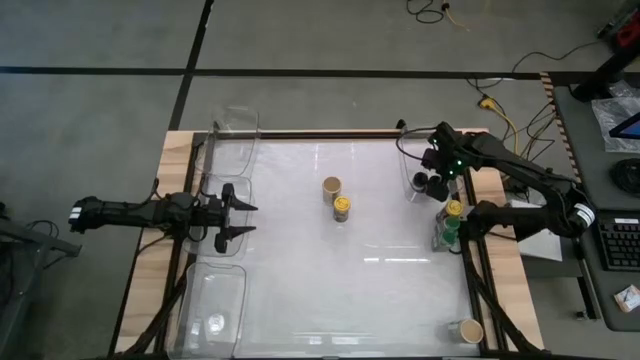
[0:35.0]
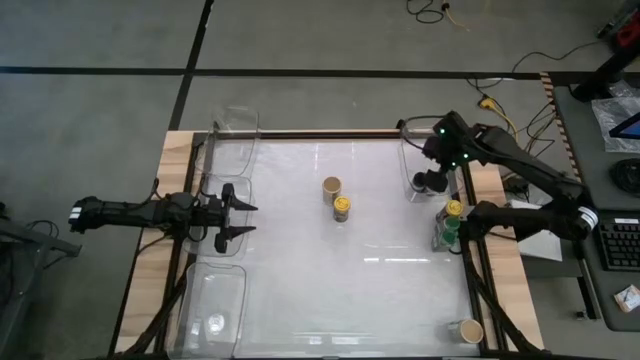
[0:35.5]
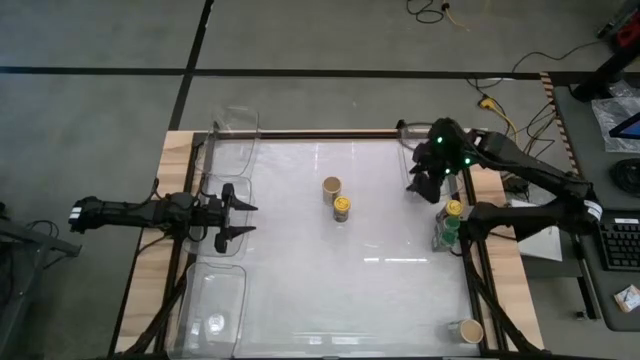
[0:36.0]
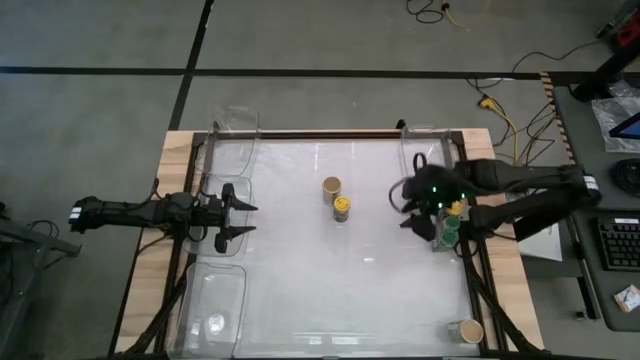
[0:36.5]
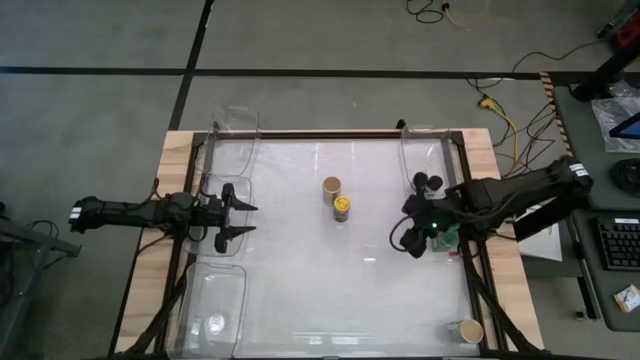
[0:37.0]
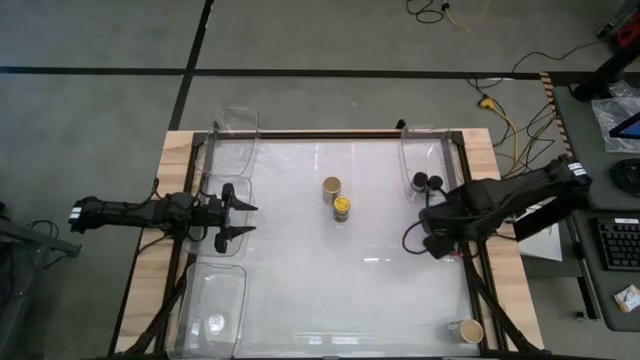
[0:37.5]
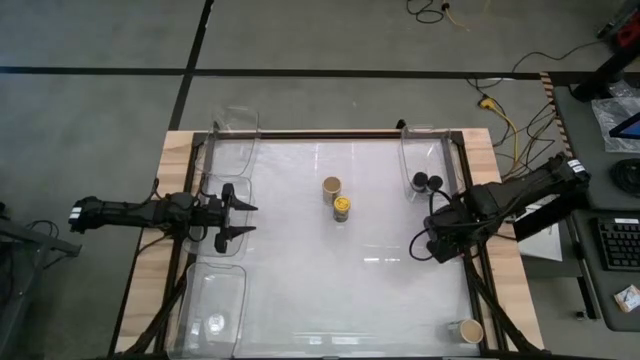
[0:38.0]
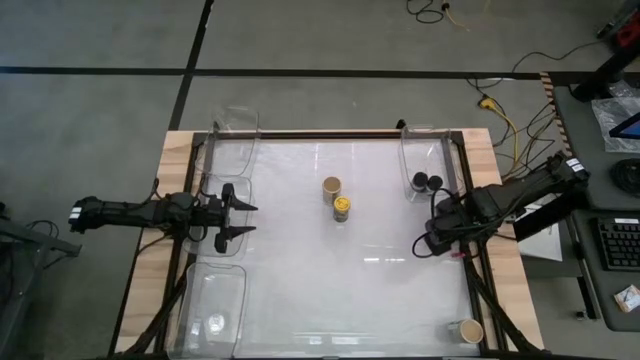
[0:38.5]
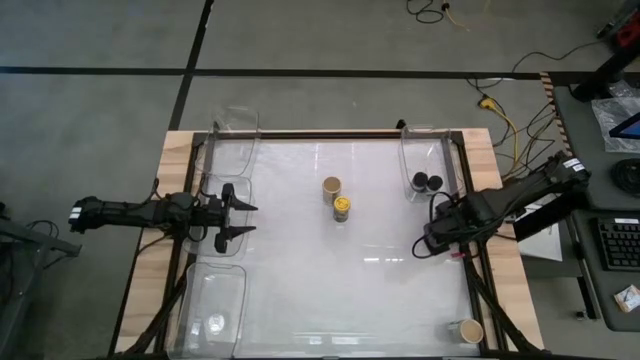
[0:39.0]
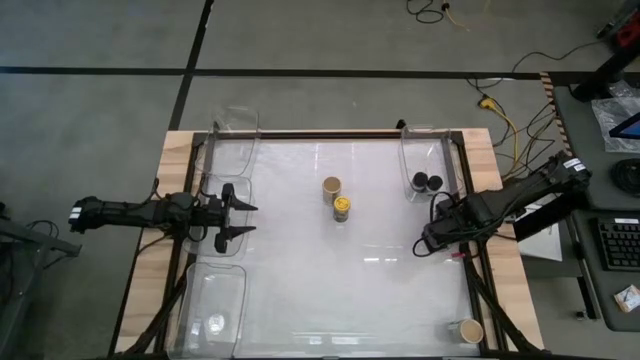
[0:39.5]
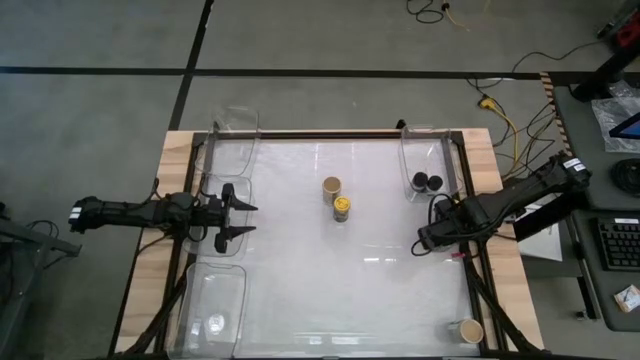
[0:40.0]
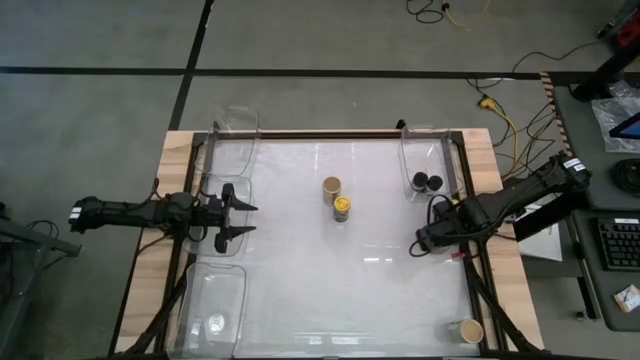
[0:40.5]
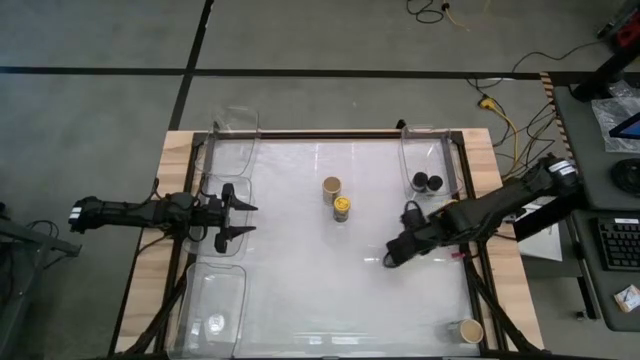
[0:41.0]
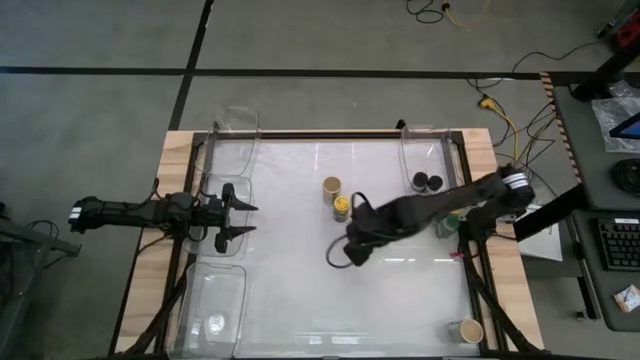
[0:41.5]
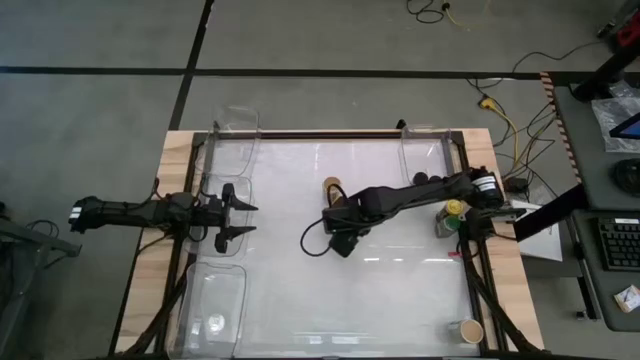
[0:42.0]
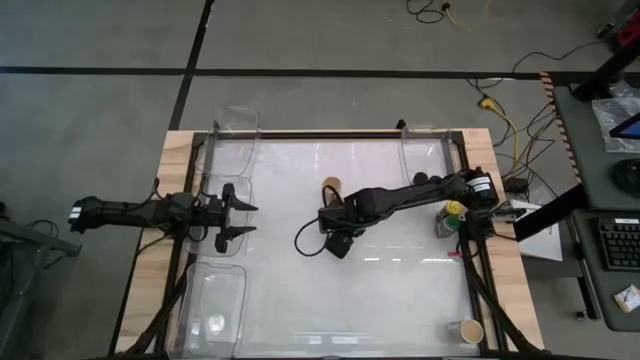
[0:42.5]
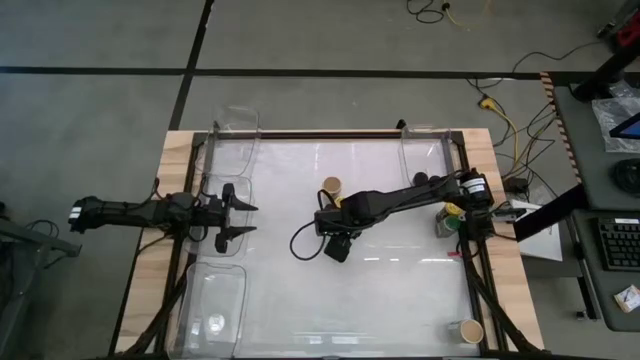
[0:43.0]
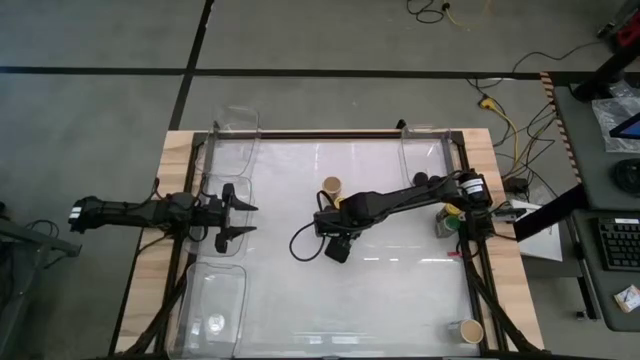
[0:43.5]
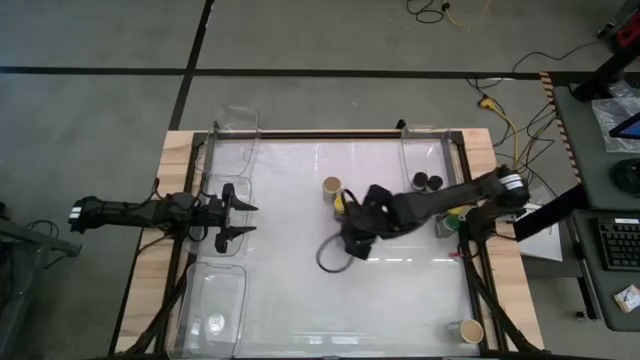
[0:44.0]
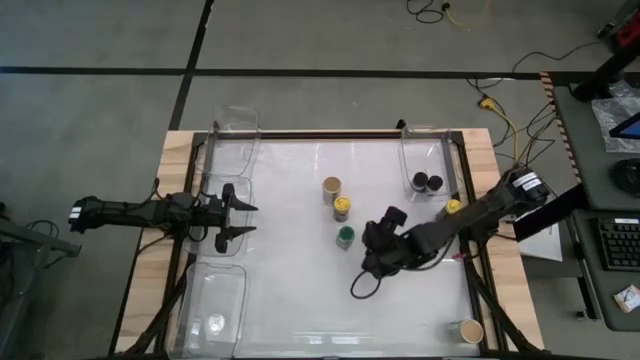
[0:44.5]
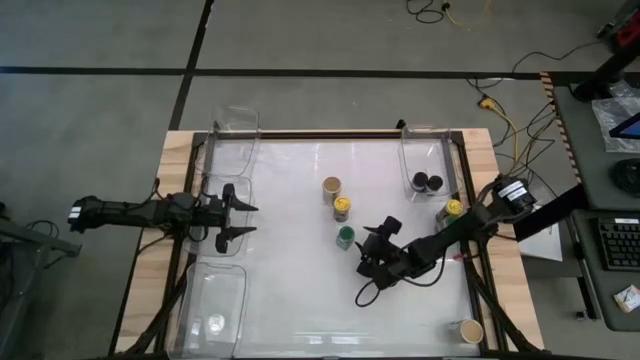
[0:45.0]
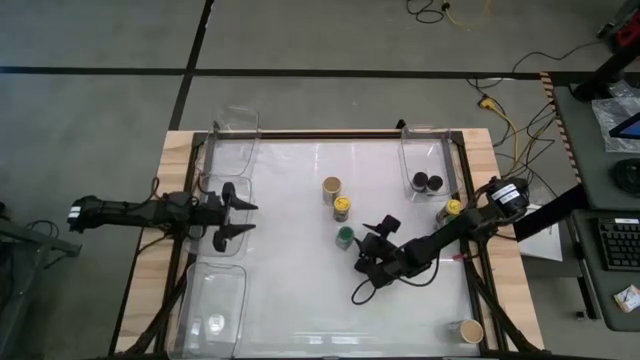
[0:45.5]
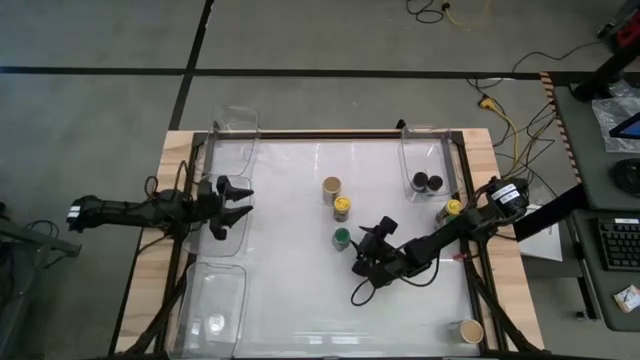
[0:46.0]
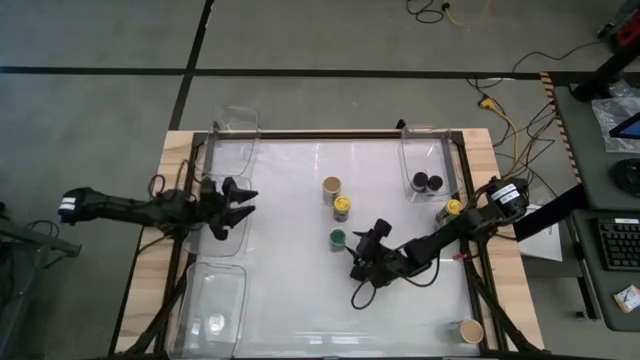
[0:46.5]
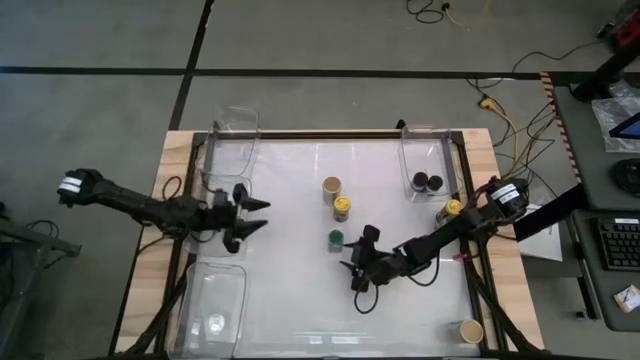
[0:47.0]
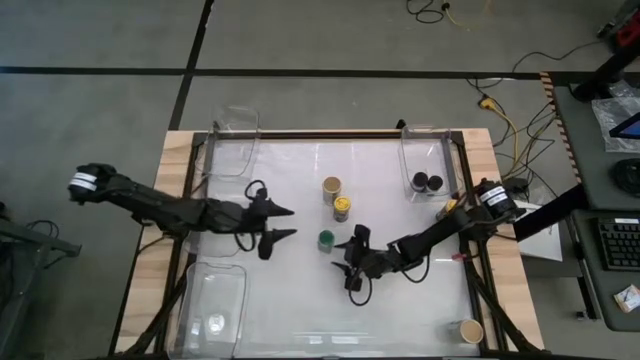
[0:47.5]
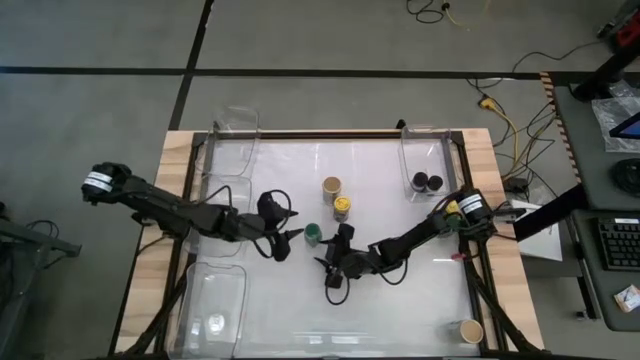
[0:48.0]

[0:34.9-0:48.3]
Task: Sort spices by type
Move the bottom green spice bottle to the center of the table

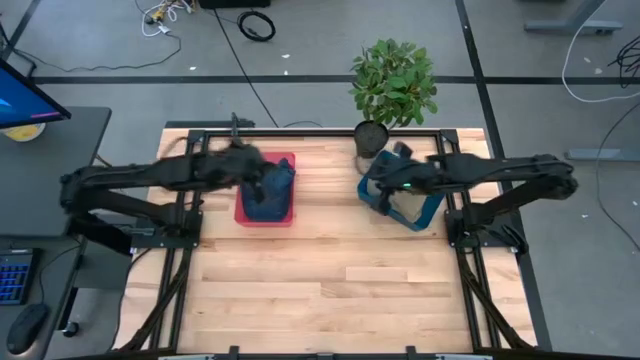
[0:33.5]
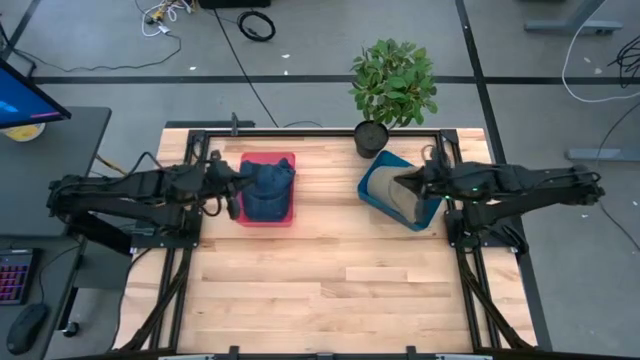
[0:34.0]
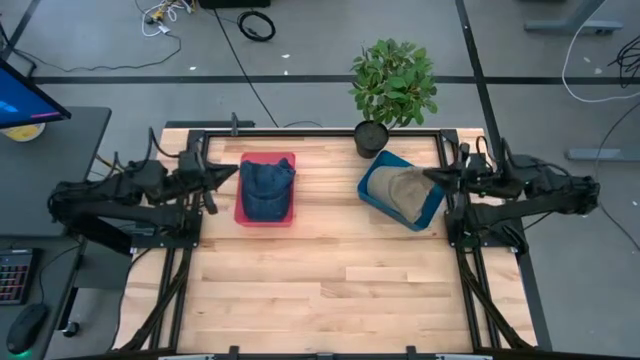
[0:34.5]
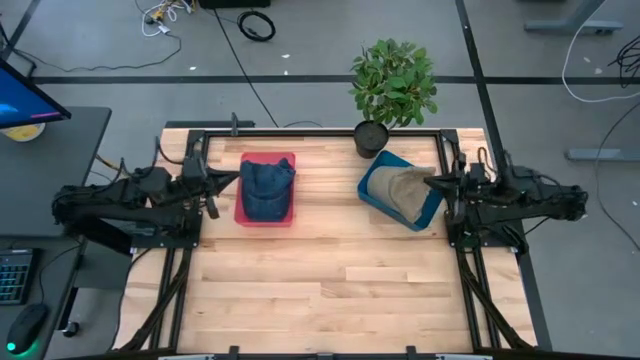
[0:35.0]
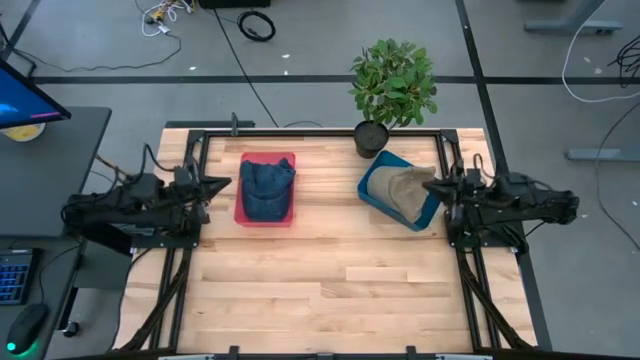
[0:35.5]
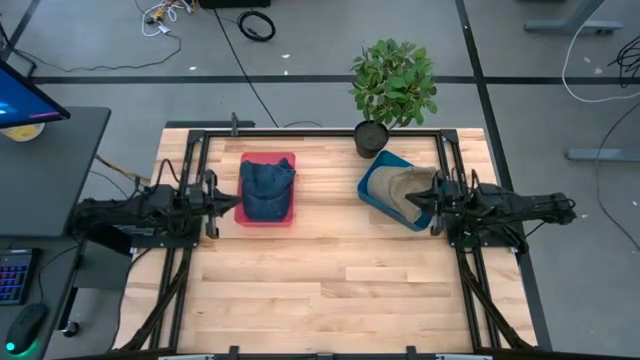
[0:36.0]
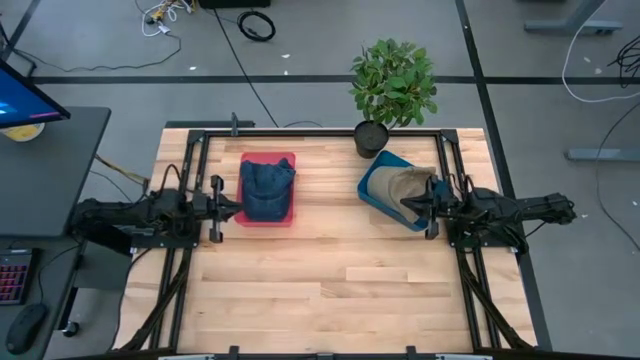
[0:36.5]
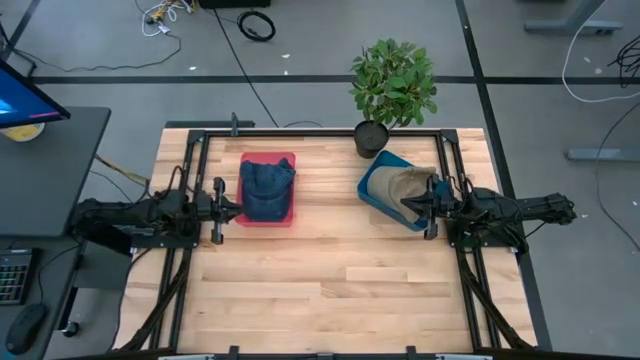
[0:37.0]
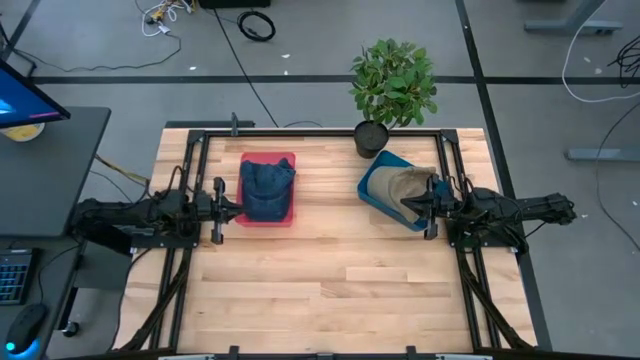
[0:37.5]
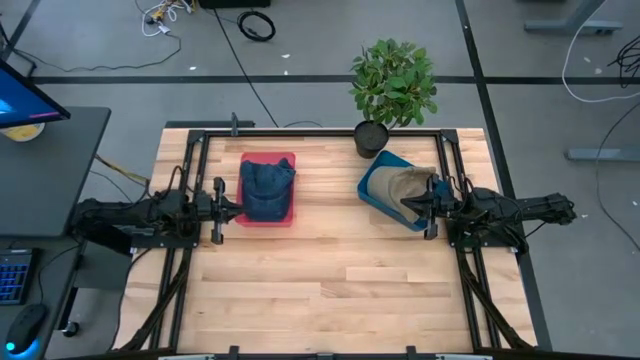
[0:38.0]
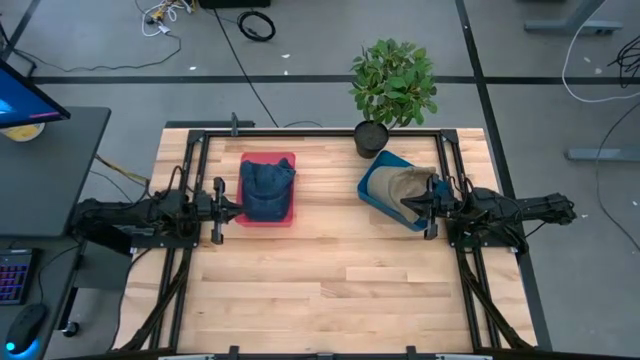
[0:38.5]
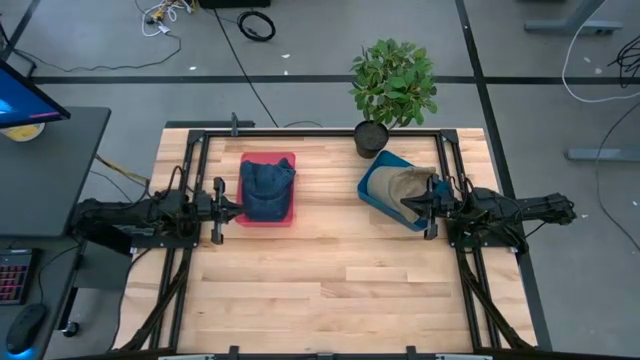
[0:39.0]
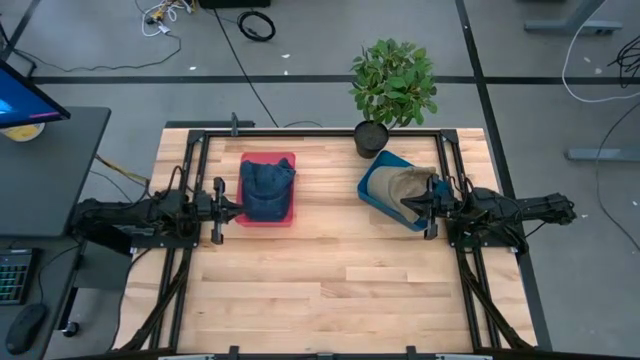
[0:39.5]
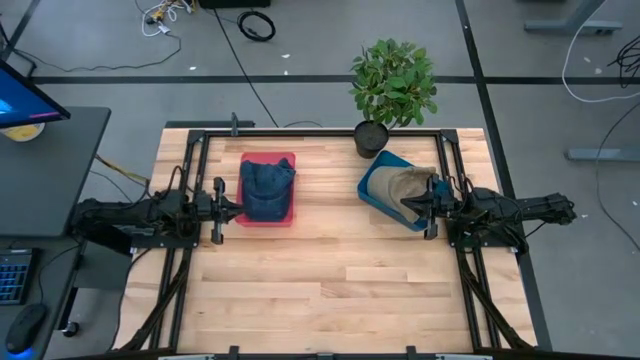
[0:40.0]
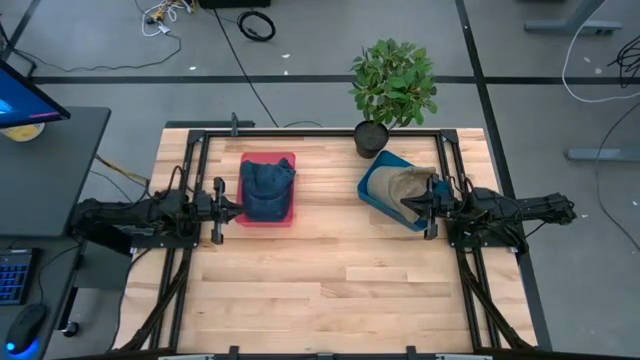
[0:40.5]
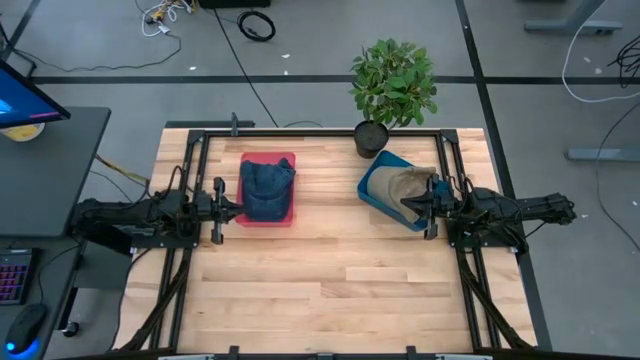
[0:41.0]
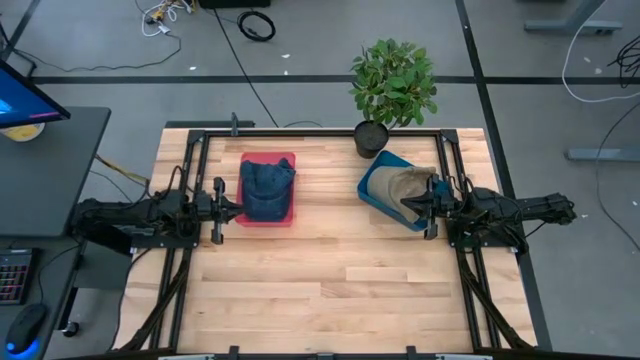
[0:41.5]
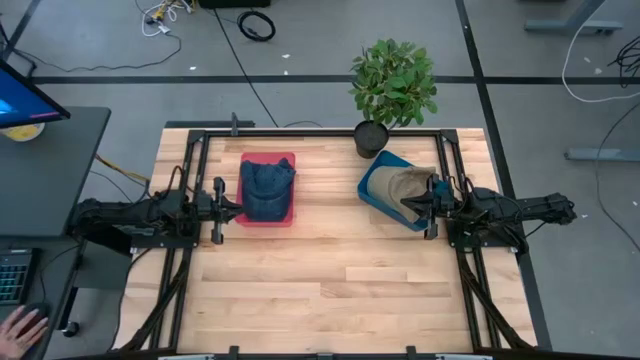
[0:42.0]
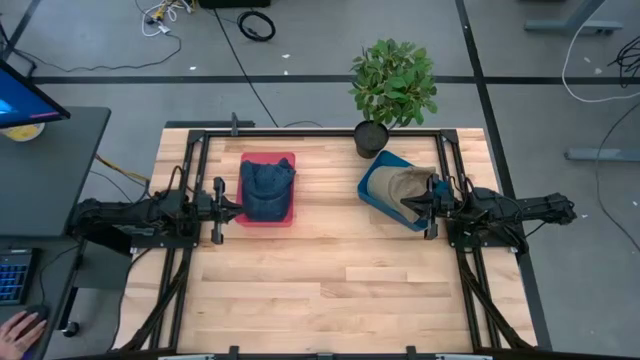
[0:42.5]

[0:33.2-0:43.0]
Task: Pick & Place hat
Return to Home Position
